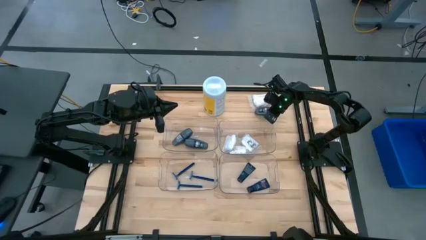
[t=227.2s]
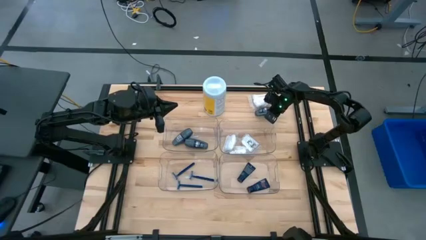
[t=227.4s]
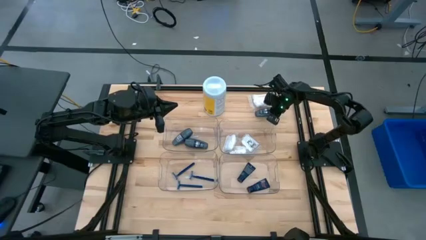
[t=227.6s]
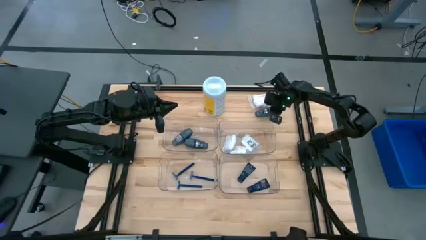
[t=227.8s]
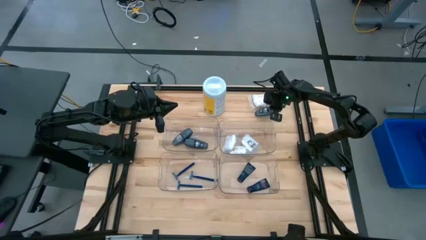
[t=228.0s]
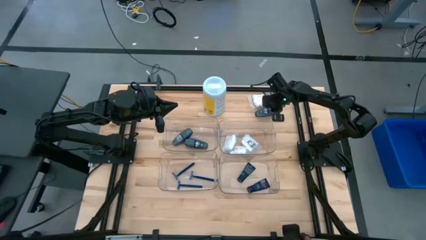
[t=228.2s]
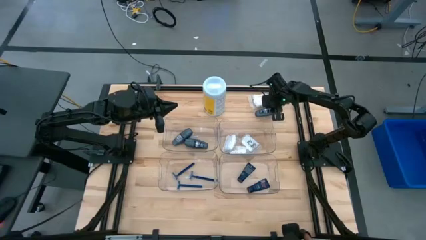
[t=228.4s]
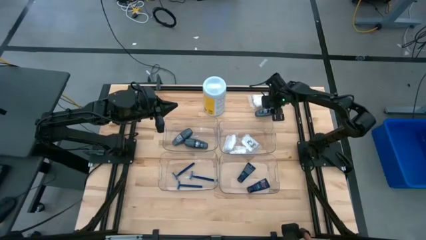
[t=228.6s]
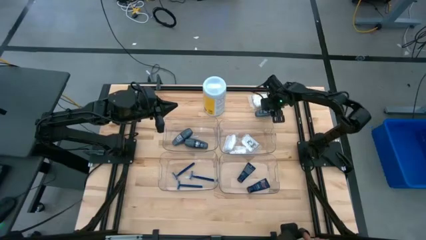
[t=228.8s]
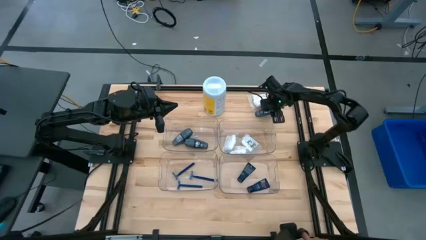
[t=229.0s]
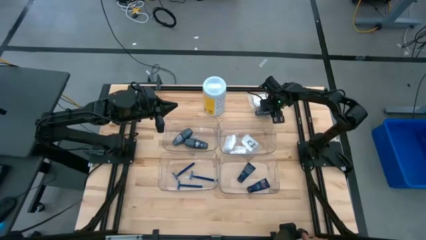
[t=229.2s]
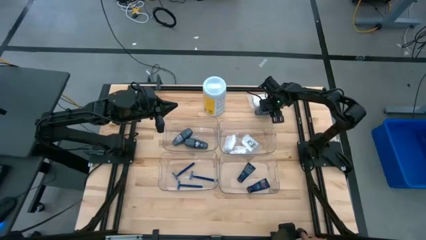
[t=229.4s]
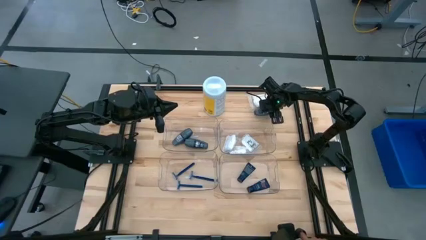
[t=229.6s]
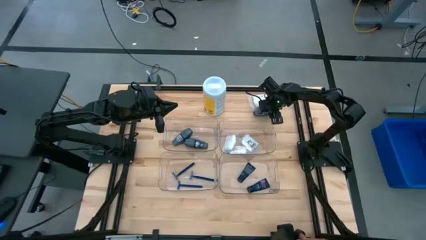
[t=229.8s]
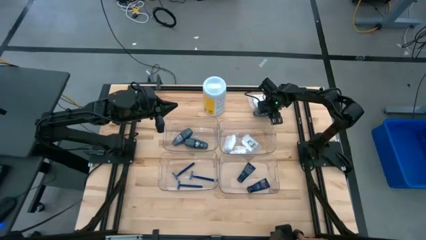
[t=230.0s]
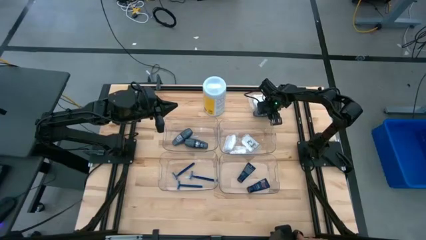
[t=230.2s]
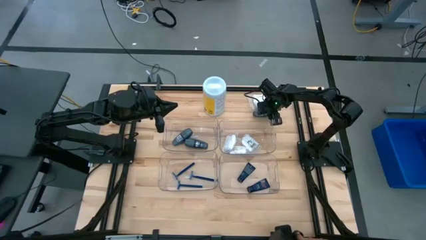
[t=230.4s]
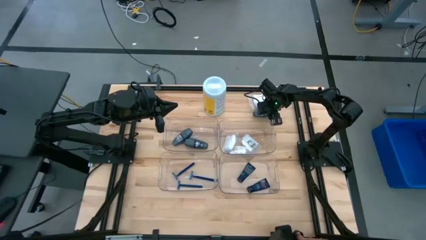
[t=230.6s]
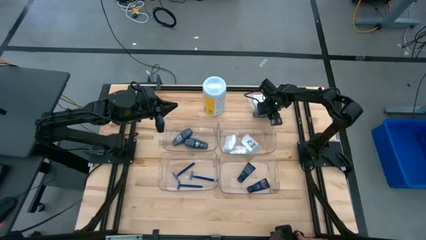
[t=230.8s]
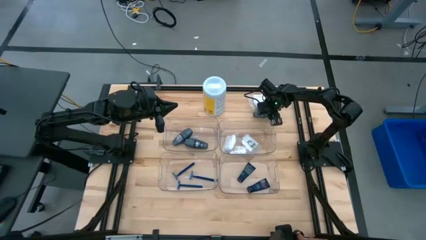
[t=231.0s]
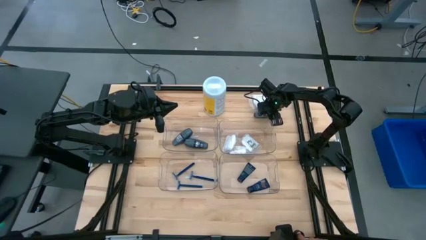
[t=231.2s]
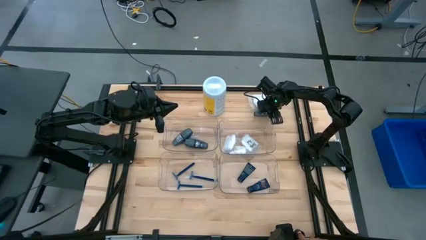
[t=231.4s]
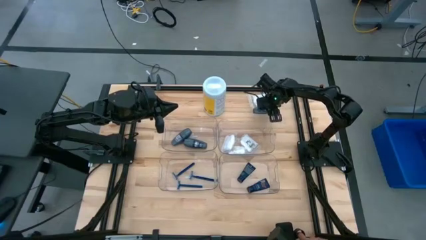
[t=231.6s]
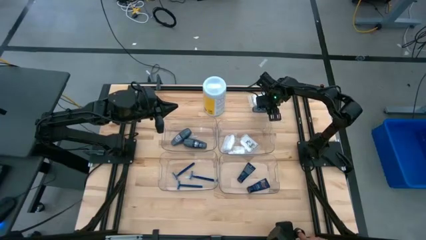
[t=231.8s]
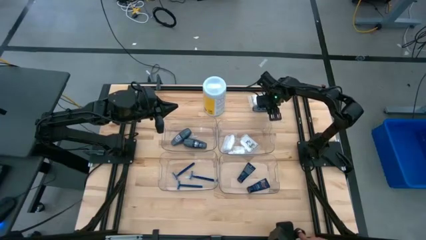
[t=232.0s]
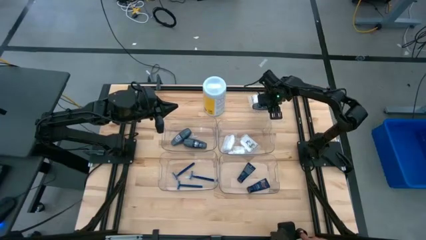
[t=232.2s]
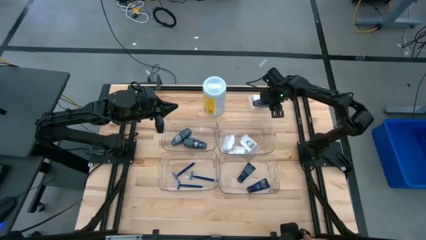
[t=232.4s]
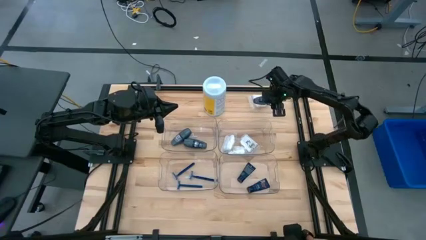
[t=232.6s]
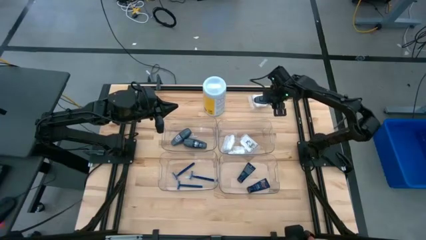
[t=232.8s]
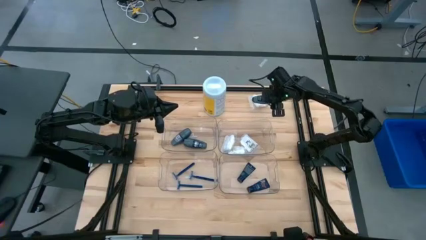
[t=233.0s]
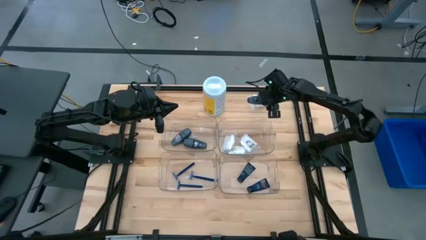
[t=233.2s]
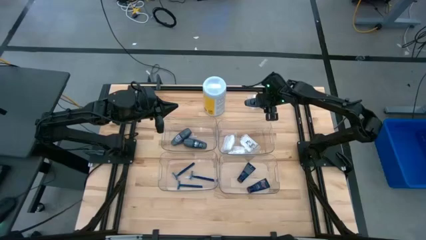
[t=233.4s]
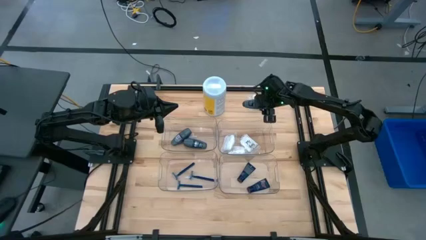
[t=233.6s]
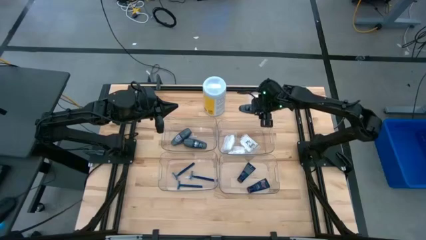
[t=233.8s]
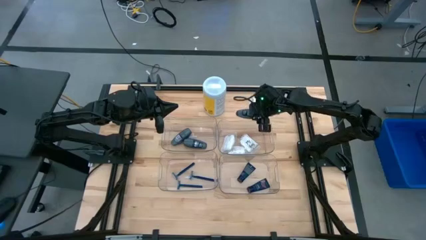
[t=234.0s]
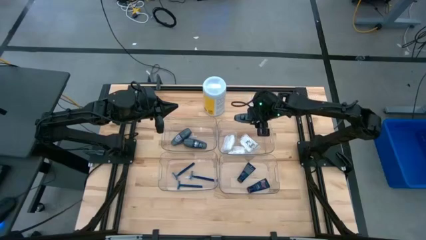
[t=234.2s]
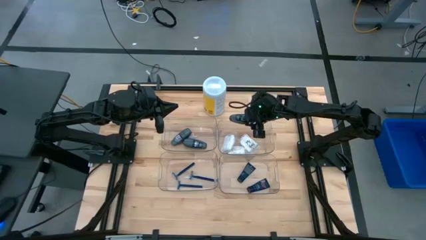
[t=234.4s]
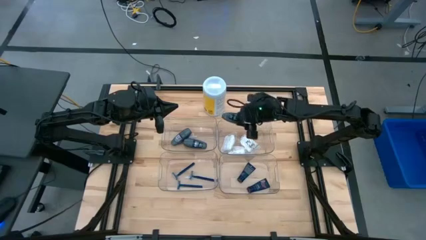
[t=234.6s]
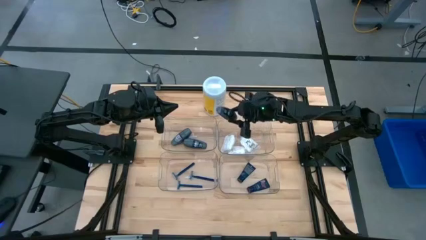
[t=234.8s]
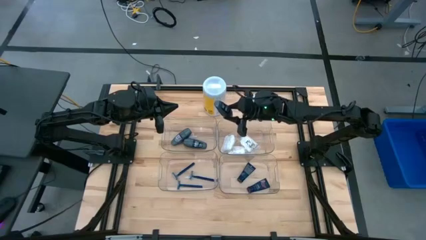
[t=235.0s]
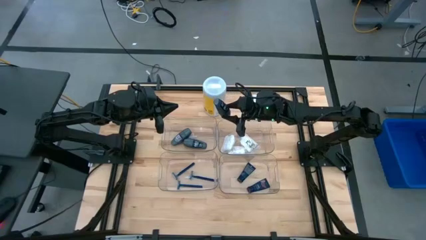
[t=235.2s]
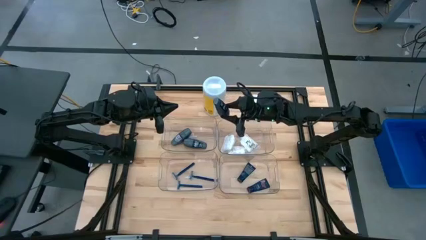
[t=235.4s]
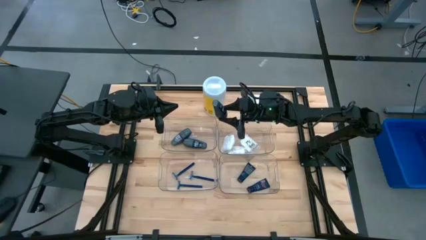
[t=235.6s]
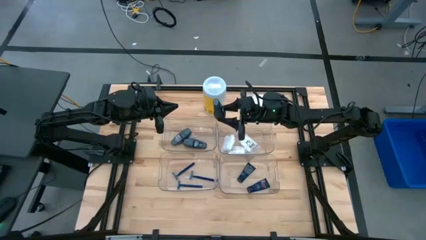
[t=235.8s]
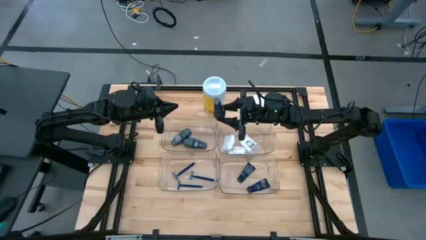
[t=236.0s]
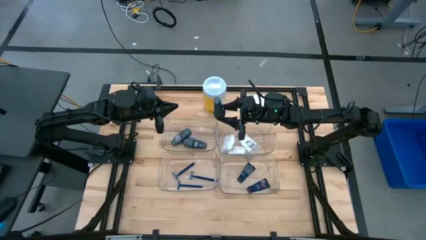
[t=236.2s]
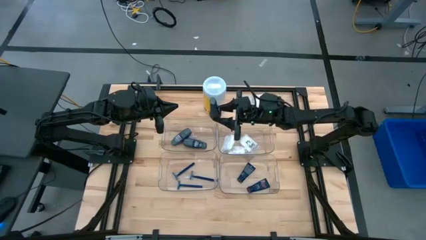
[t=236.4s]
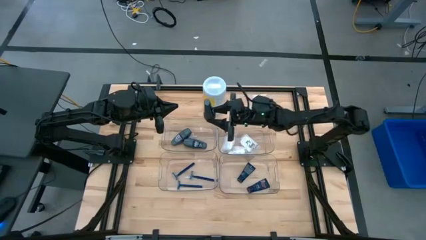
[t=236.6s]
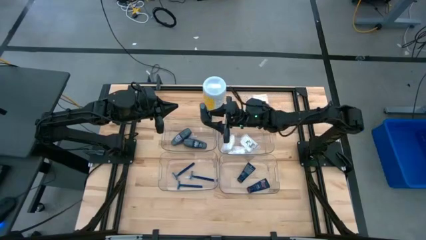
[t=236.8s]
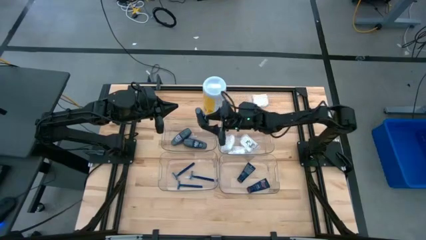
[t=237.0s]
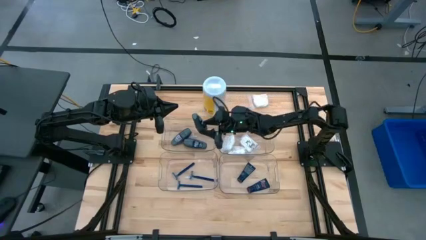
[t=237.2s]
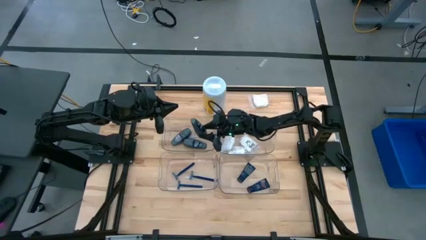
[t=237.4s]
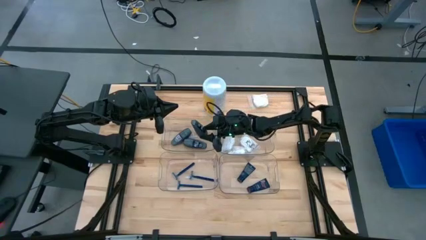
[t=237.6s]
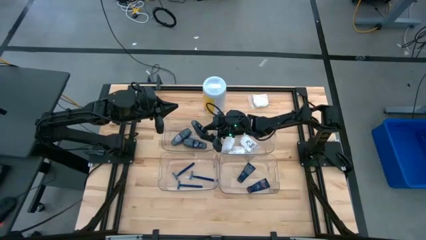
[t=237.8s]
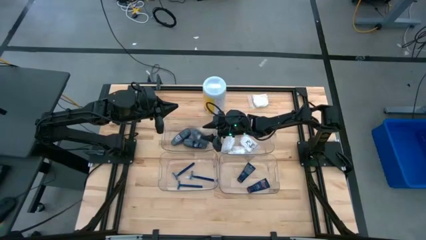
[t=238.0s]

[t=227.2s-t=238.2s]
Task: Pick & Place Travel size toiletries
Put the black deodorant into the top left transparent bin

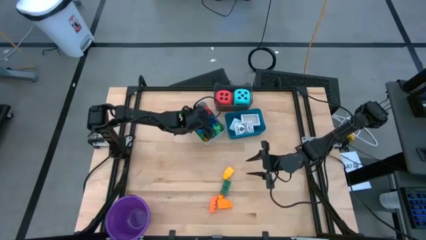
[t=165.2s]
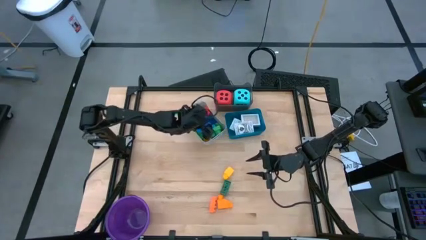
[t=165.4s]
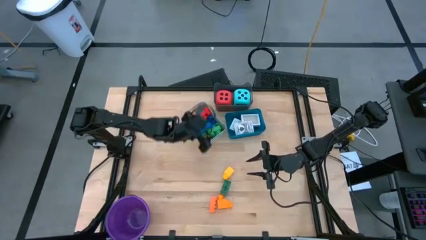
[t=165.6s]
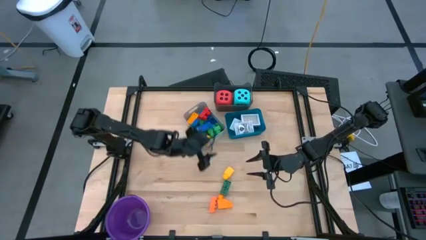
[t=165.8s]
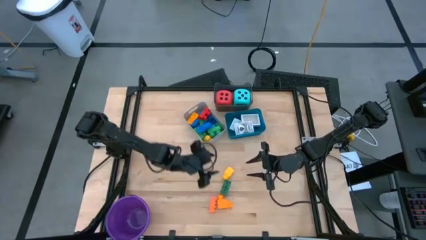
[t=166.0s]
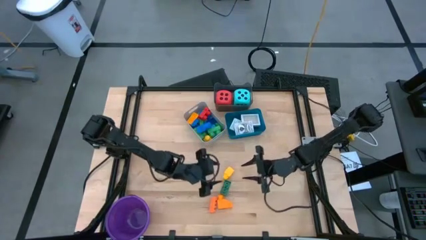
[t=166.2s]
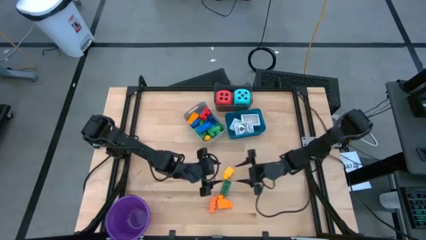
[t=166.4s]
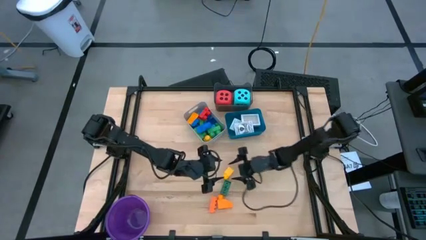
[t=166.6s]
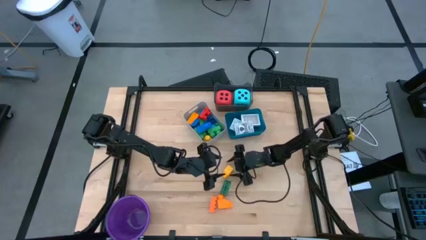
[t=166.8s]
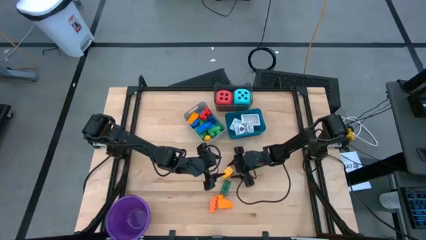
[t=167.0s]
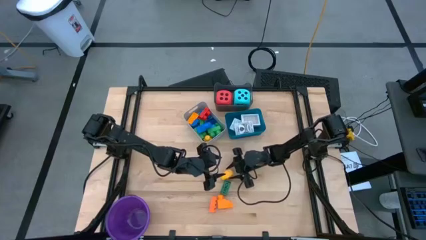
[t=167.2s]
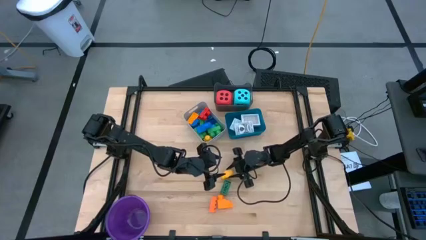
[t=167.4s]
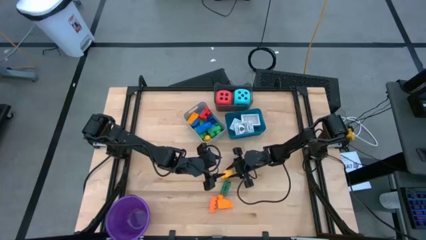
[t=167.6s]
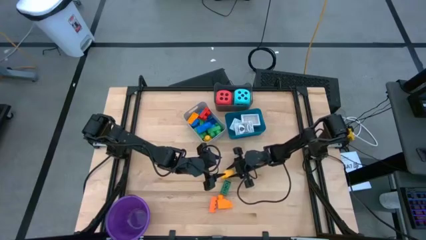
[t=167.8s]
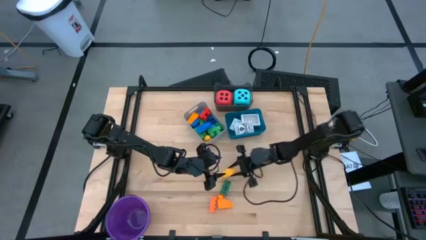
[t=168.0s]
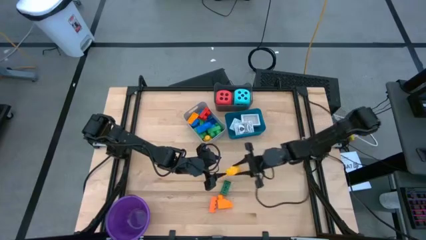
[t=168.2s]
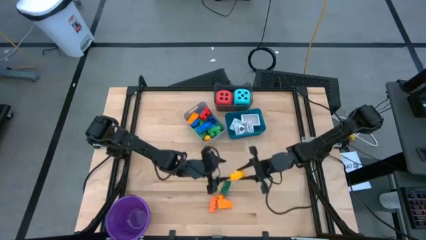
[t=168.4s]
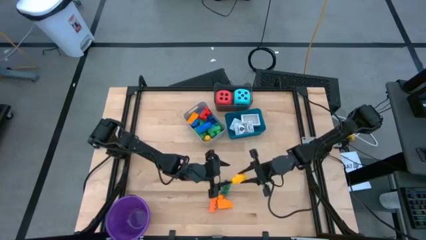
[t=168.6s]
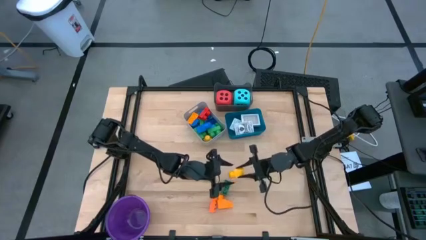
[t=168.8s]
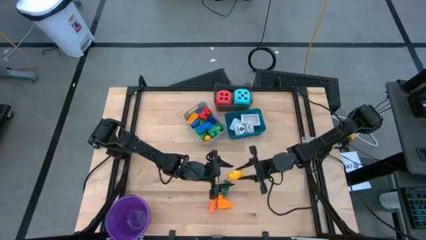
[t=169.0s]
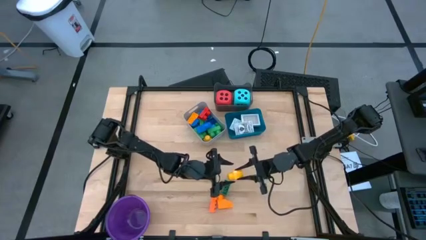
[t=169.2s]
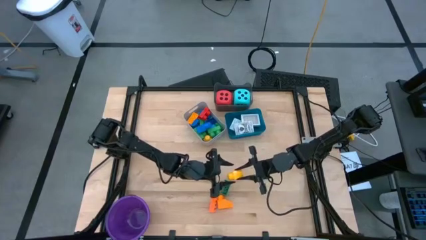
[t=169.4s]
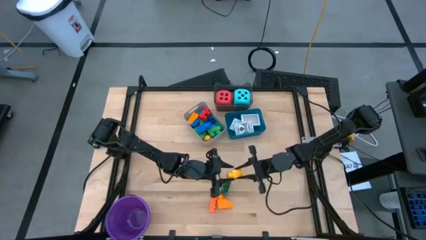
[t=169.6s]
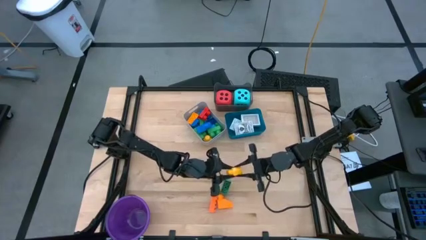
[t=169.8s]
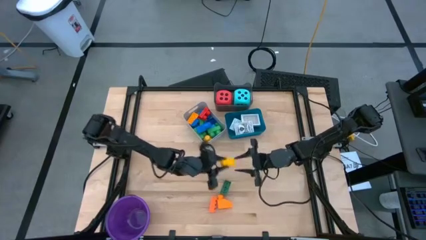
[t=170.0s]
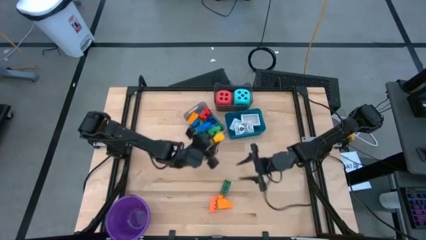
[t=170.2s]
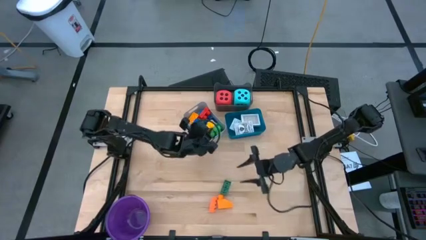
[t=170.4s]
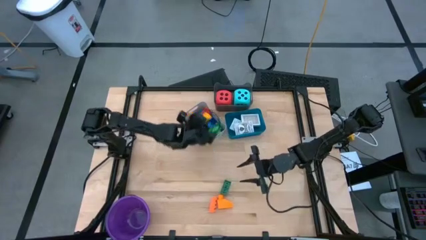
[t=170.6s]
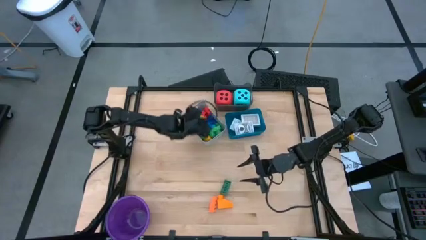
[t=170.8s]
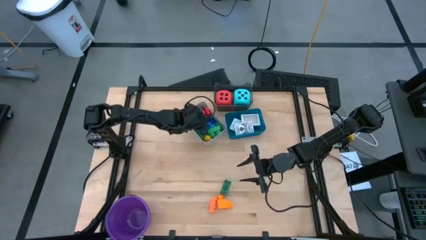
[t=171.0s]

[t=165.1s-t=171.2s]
Task: Pick & Place Toys
Put the yellow game piece into the gray bin
